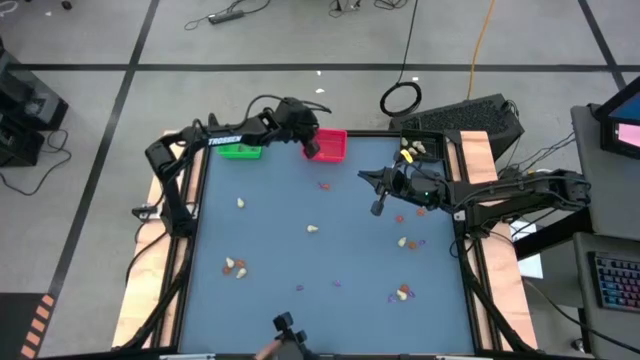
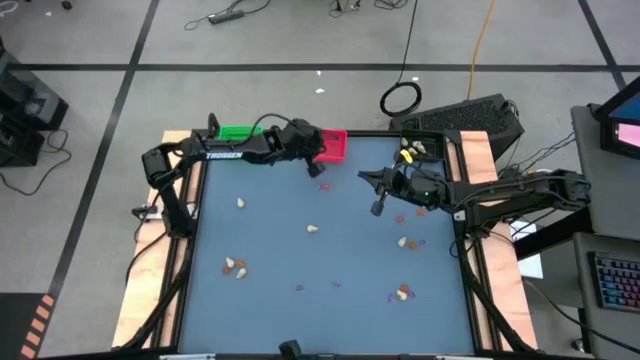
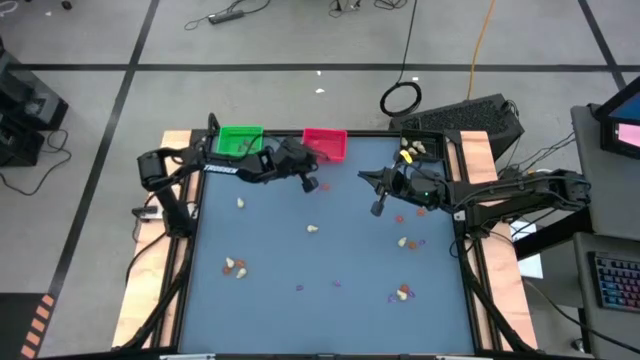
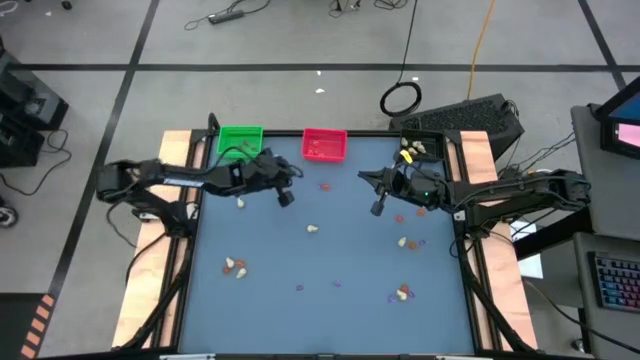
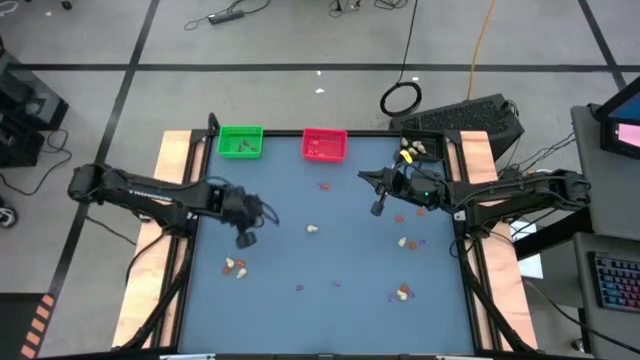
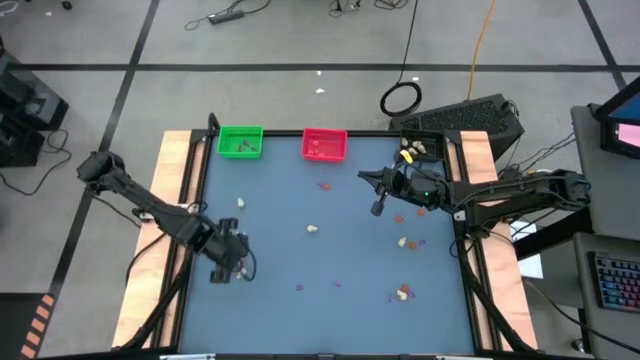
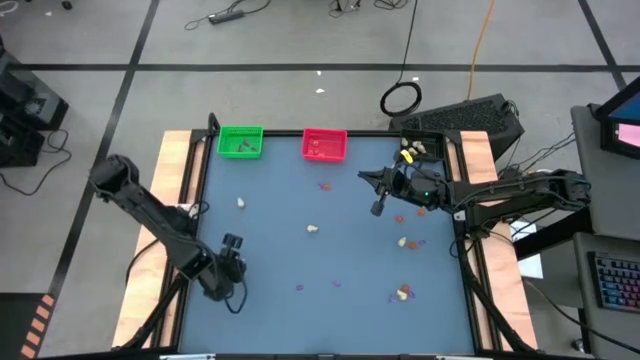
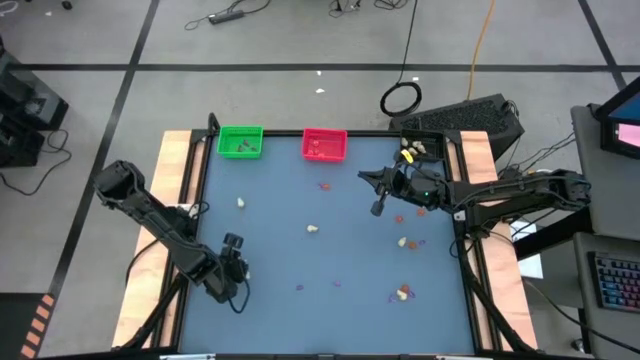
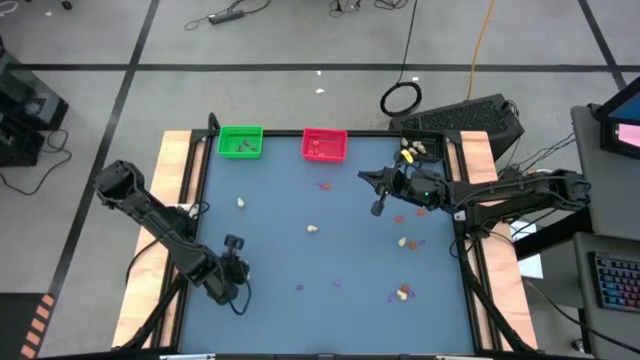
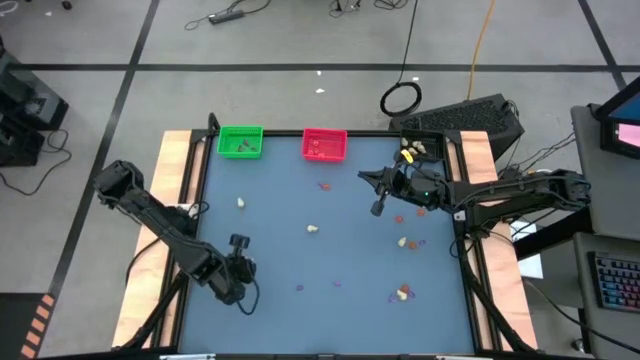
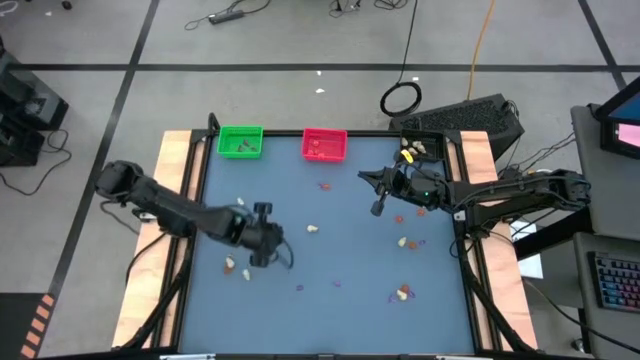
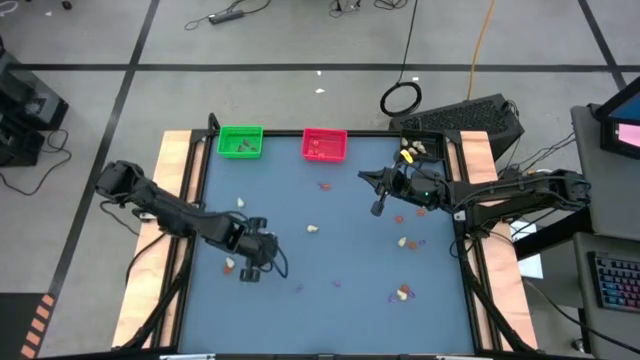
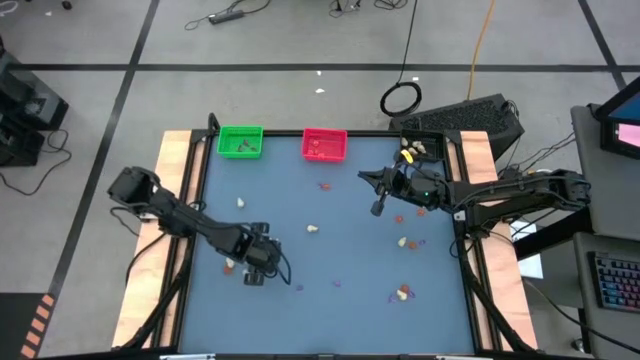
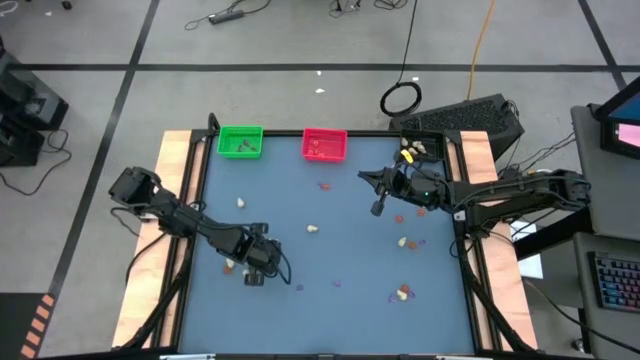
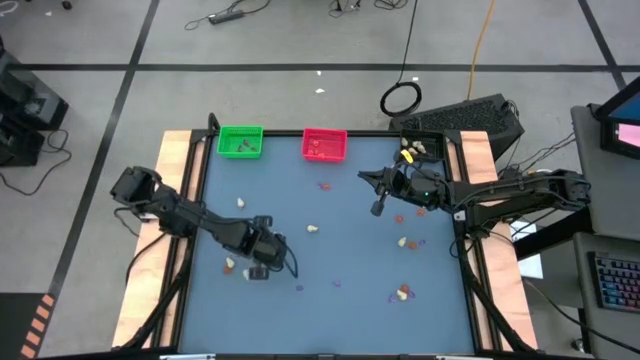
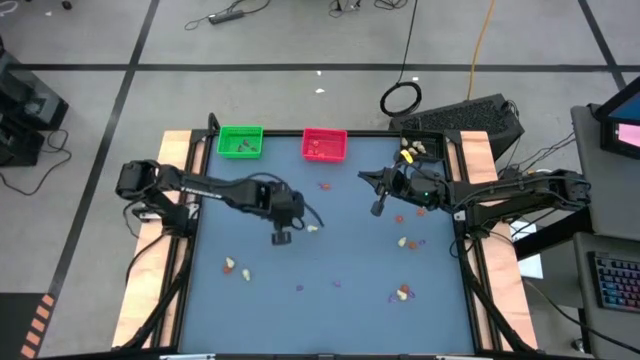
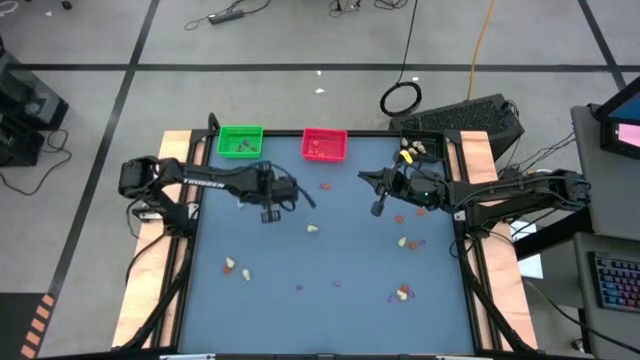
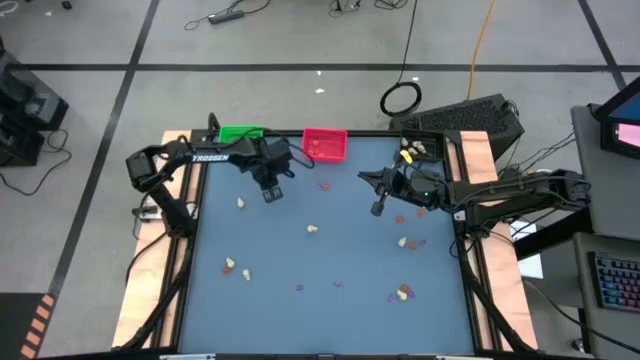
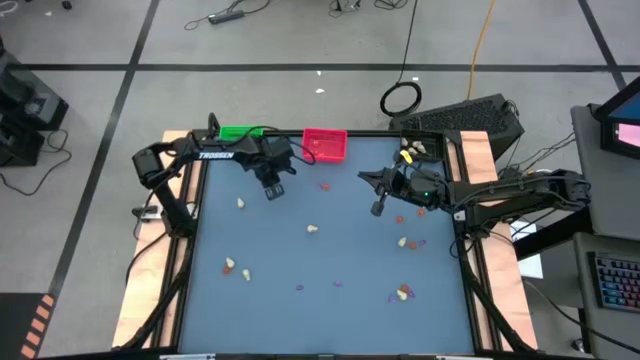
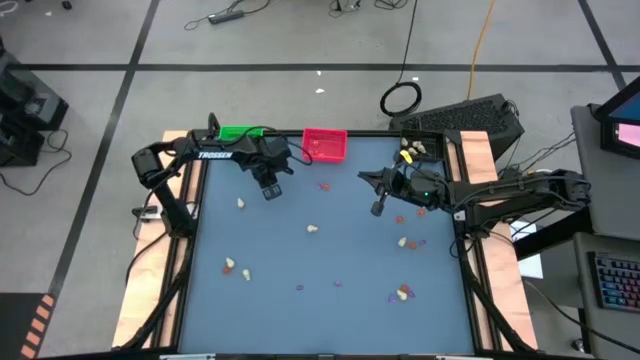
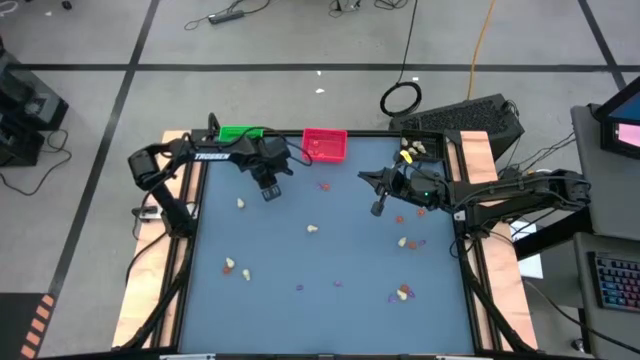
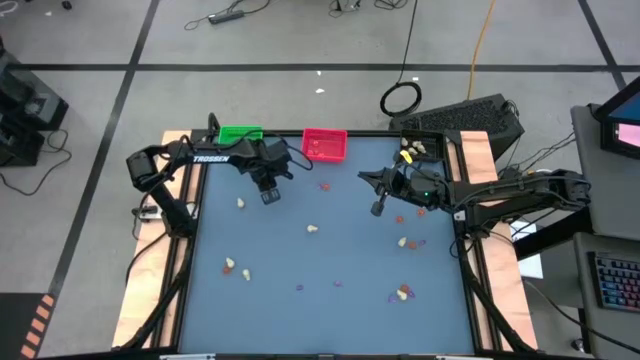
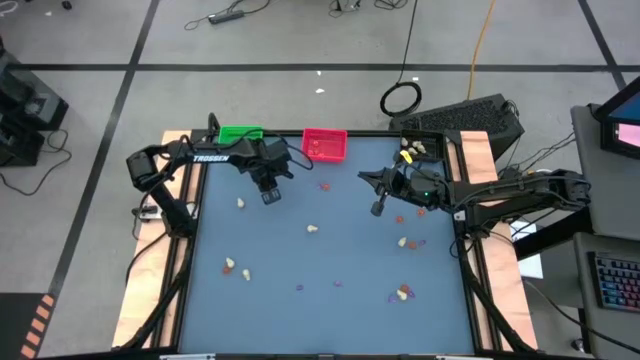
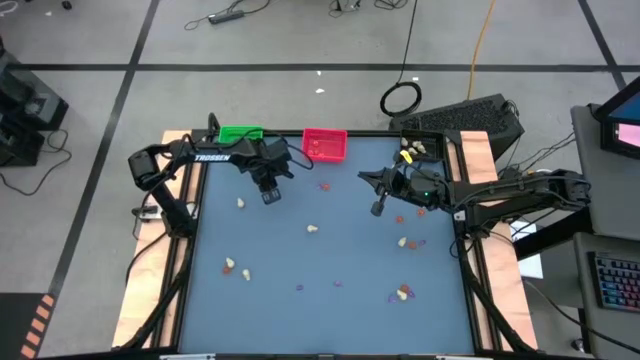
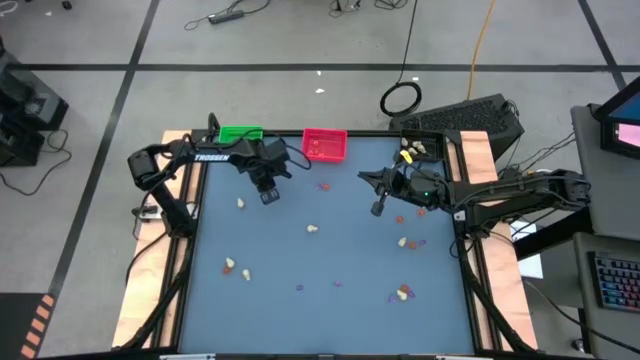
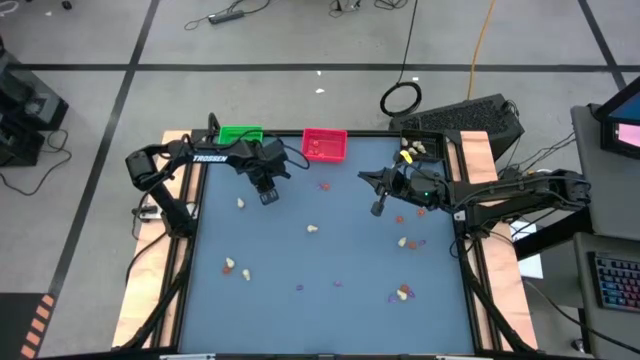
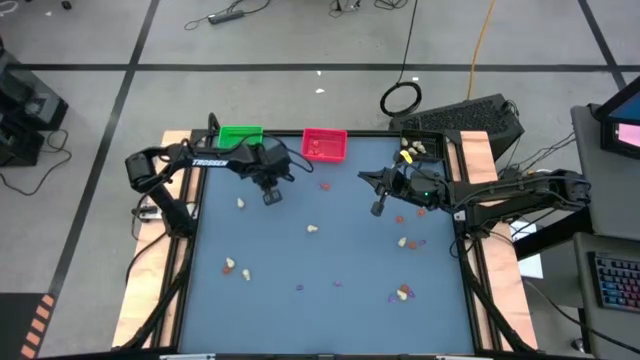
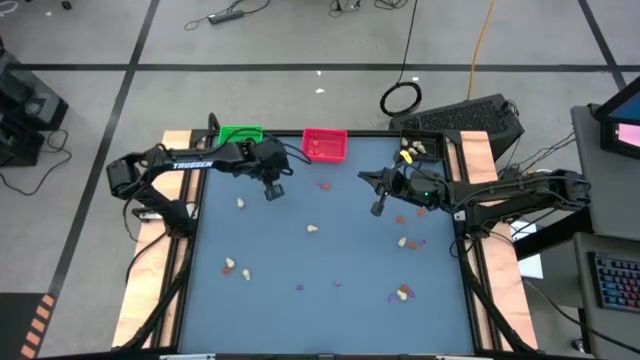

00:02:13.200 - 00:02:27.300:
Task: Sort Halloween decoration
Put the orange pumpkin toy into the red bin

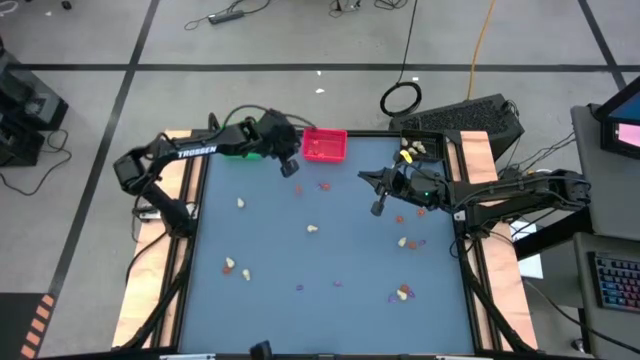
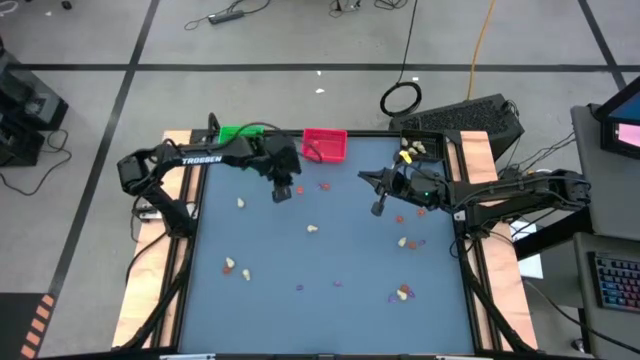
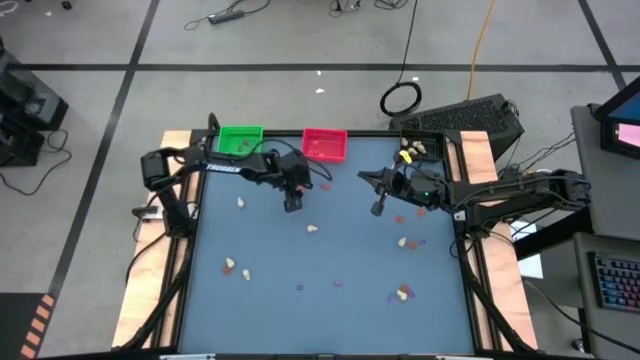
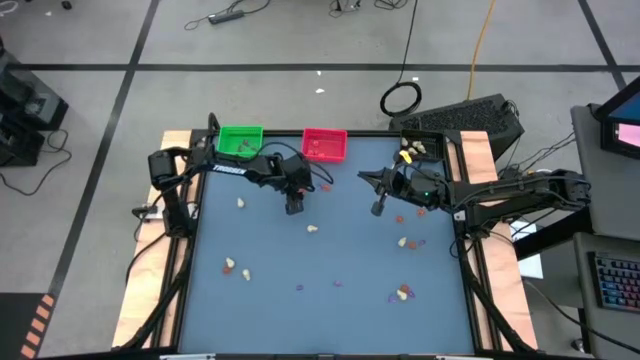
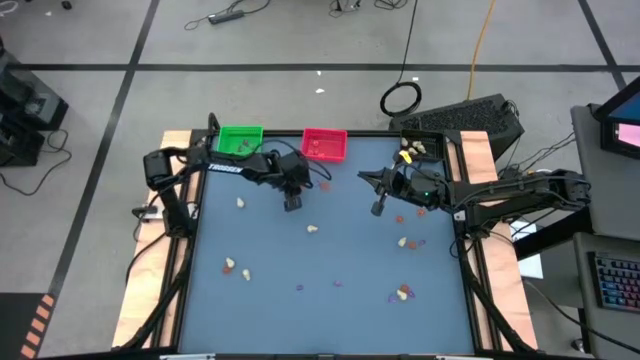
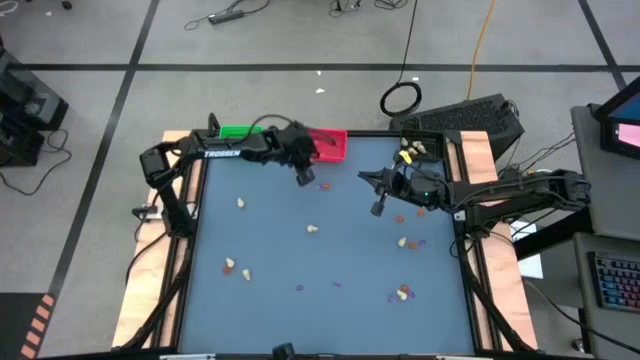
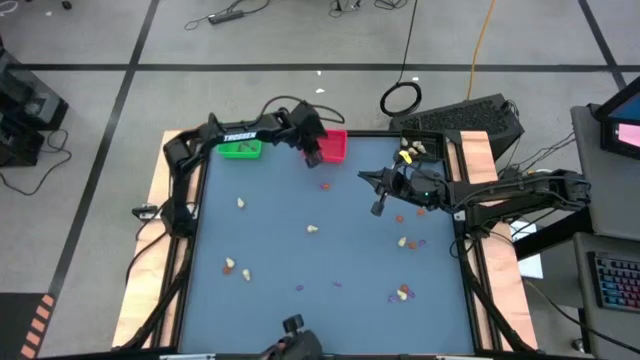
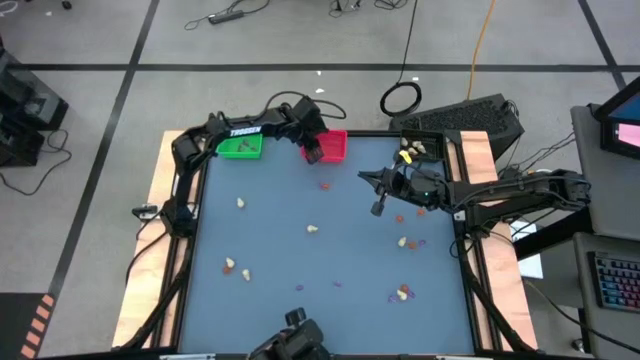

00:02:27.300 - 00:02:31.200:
Put the orange pumpkin toy into the red bin

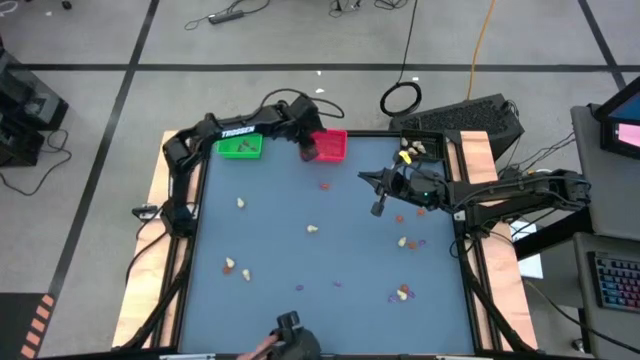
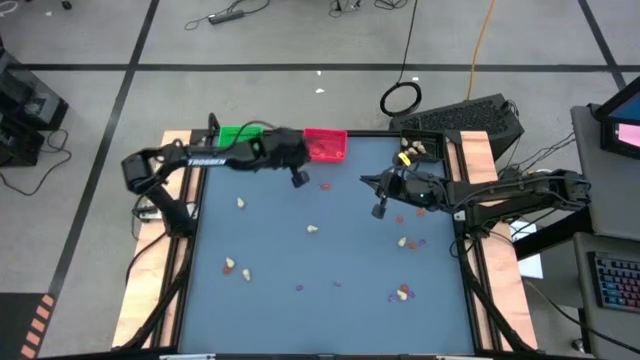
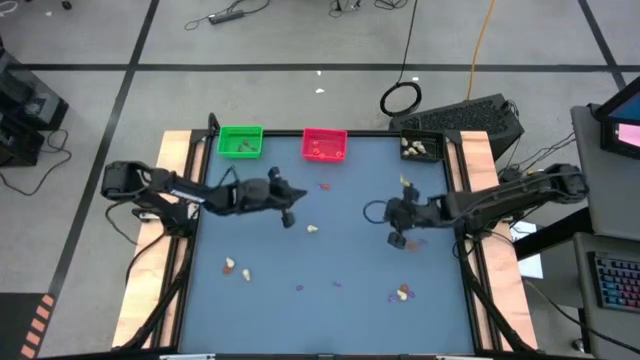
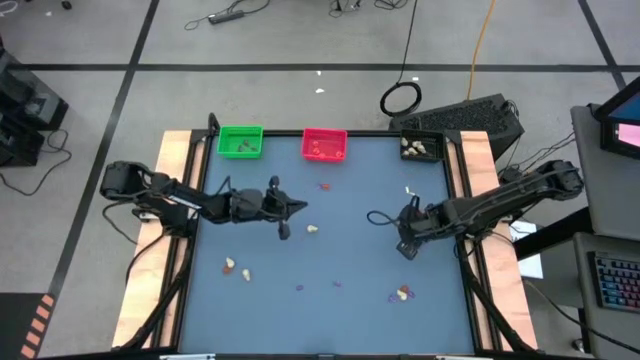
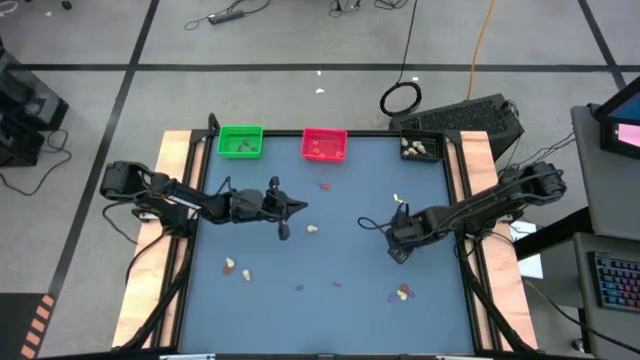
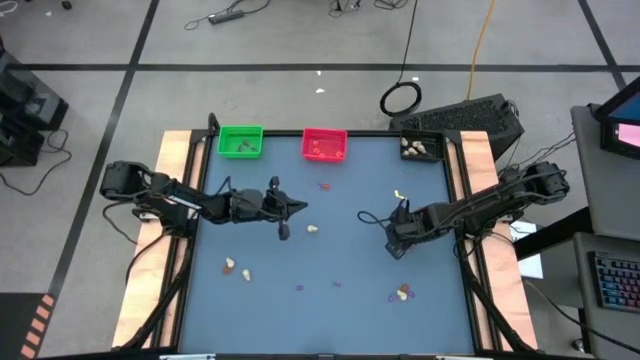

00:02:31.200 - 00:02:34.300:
Put the white skull toy into the black bin

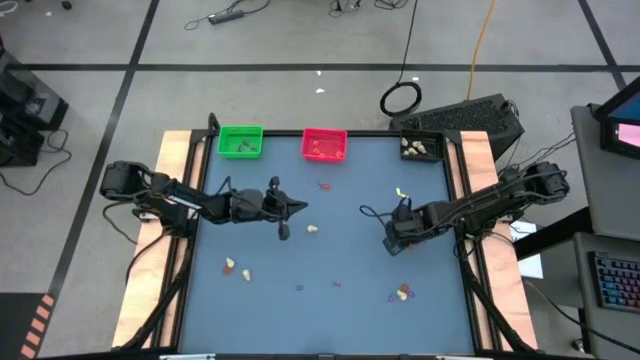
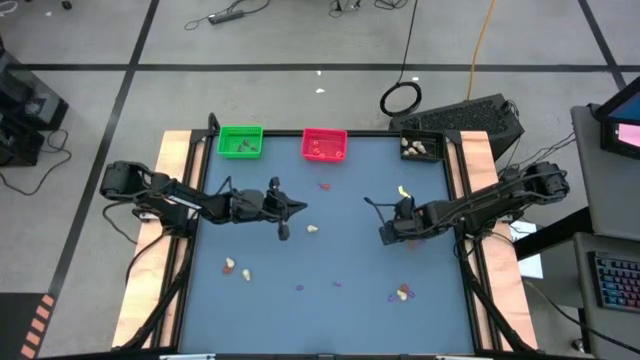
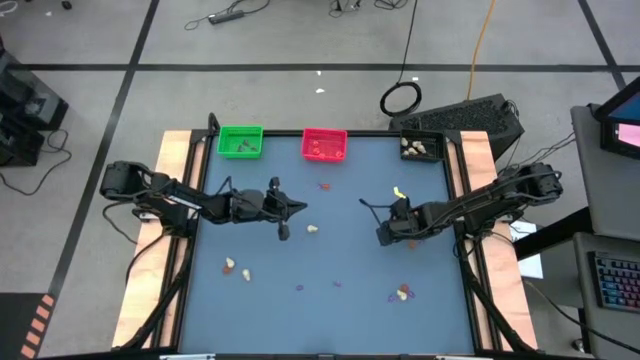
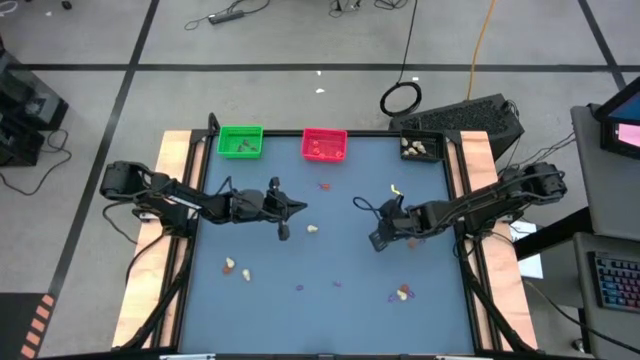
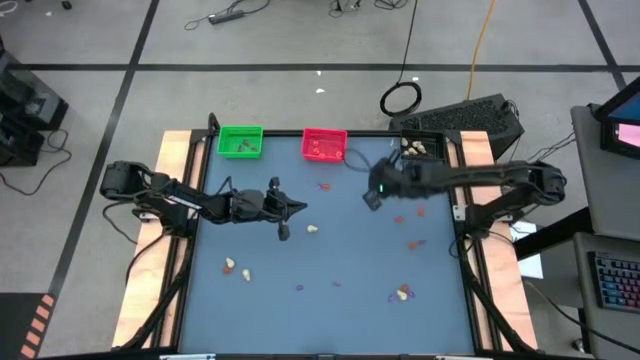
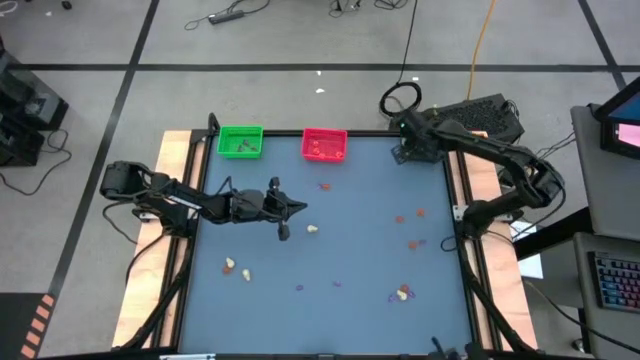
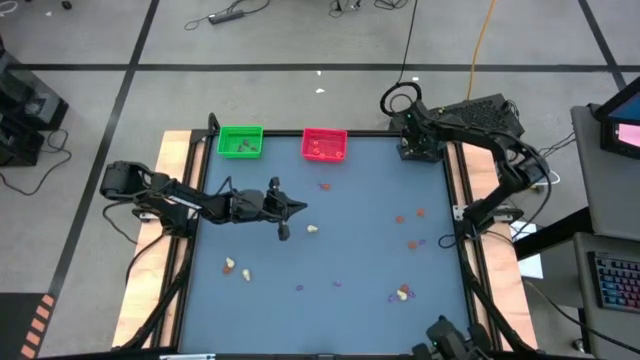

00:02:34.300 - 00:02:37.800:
Put the white skull toy into the black bin
